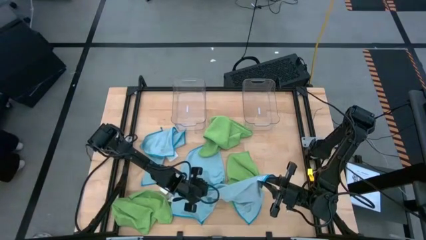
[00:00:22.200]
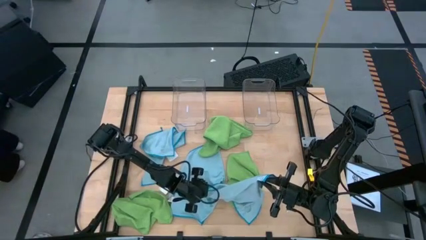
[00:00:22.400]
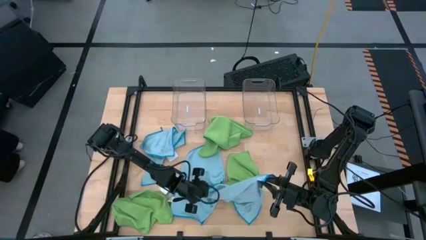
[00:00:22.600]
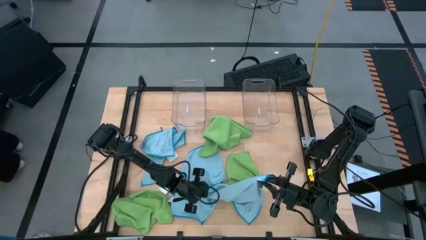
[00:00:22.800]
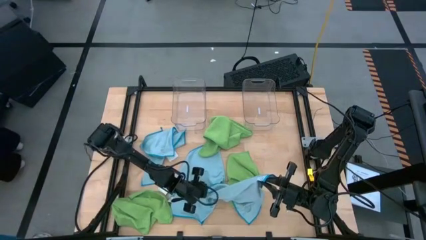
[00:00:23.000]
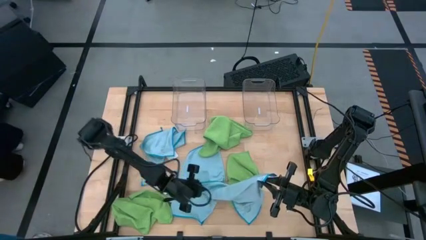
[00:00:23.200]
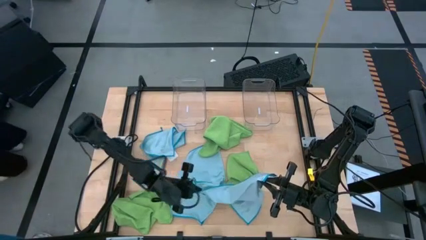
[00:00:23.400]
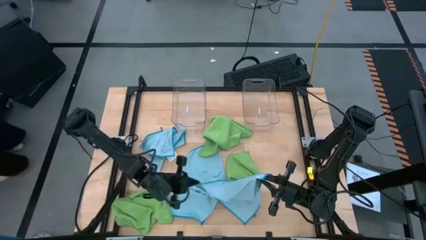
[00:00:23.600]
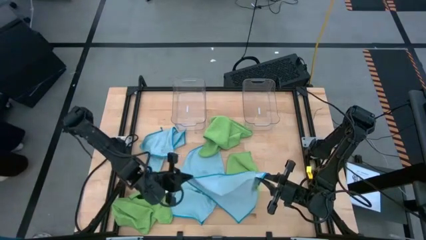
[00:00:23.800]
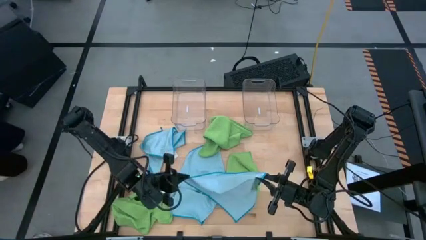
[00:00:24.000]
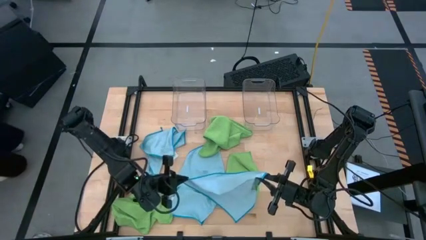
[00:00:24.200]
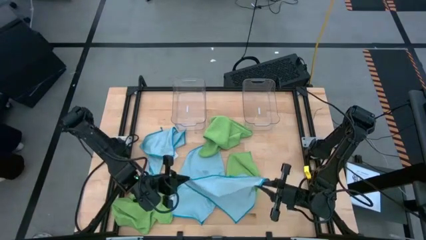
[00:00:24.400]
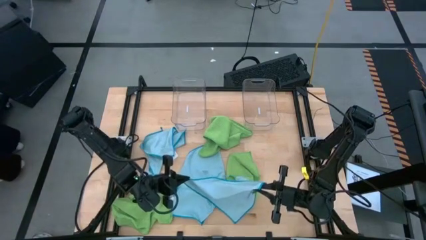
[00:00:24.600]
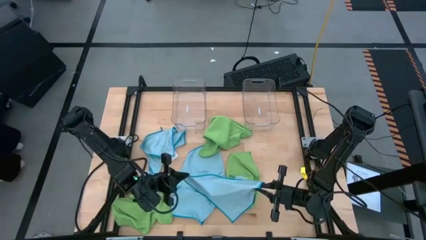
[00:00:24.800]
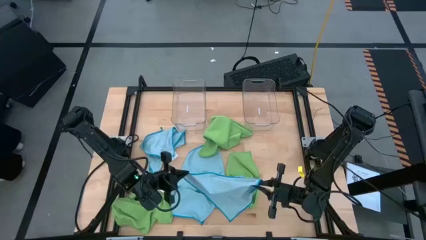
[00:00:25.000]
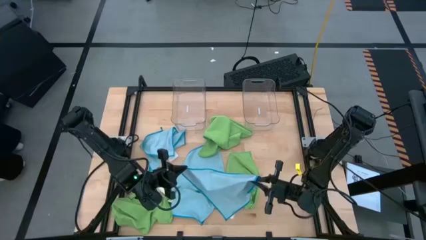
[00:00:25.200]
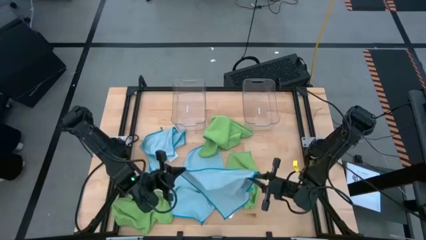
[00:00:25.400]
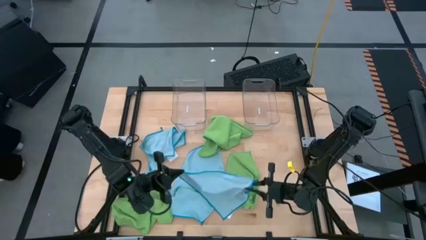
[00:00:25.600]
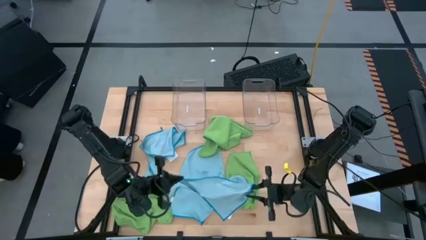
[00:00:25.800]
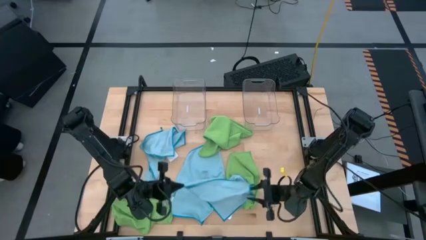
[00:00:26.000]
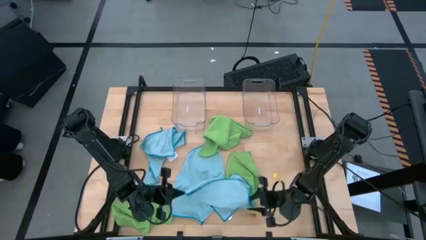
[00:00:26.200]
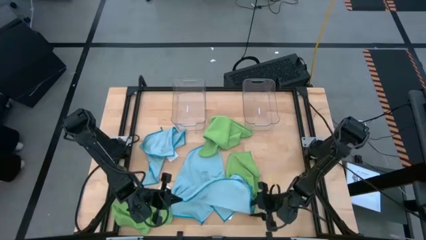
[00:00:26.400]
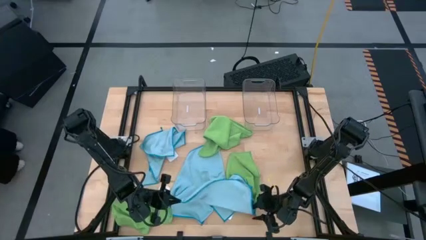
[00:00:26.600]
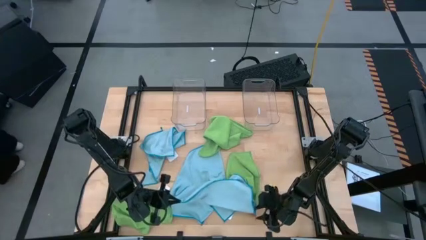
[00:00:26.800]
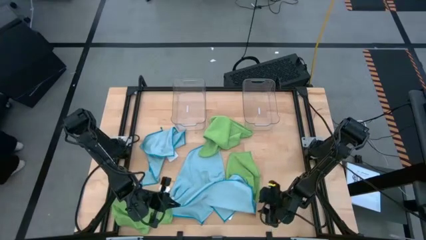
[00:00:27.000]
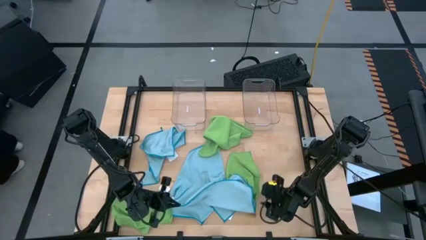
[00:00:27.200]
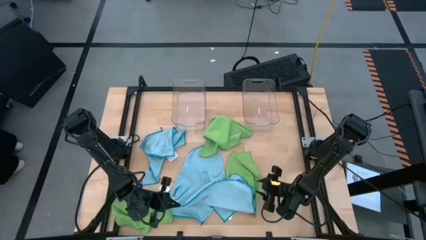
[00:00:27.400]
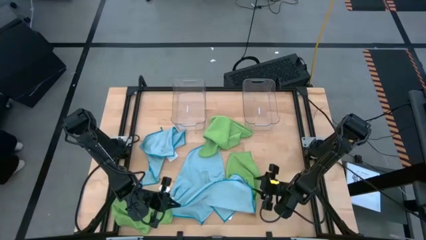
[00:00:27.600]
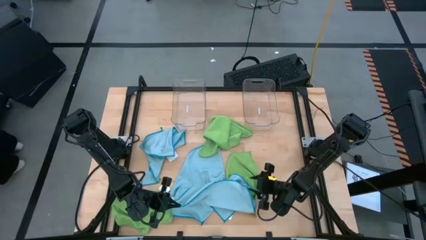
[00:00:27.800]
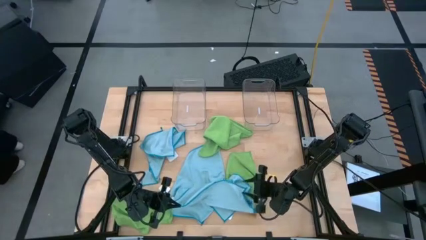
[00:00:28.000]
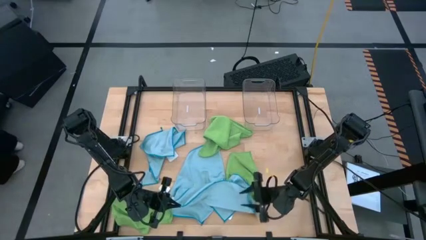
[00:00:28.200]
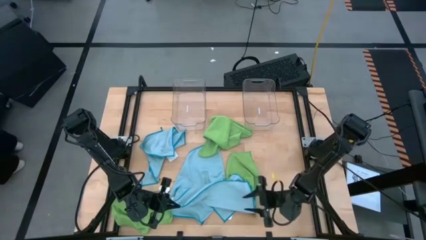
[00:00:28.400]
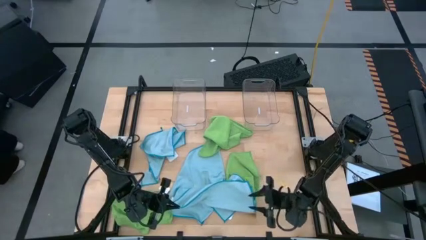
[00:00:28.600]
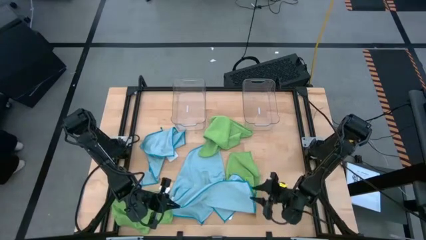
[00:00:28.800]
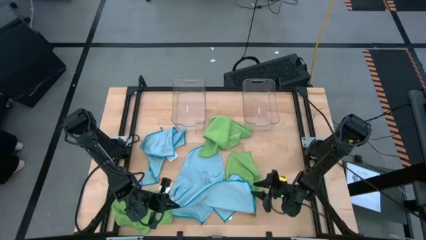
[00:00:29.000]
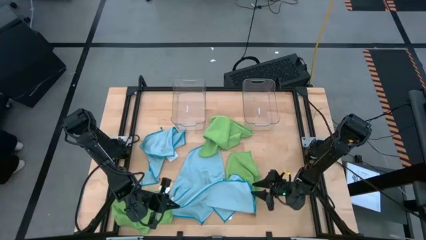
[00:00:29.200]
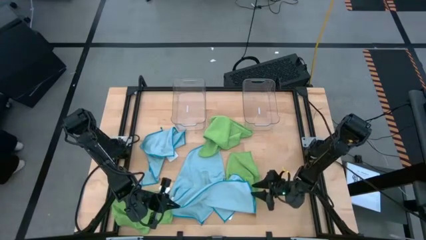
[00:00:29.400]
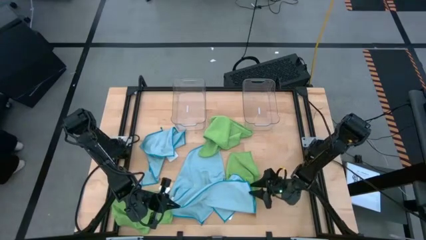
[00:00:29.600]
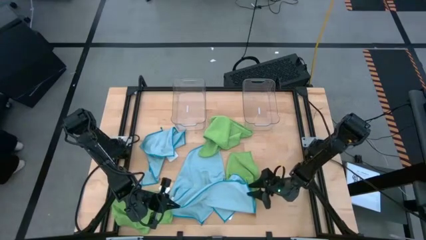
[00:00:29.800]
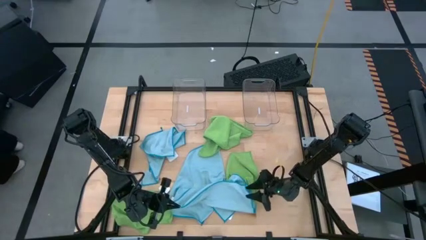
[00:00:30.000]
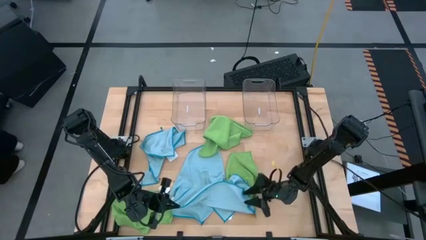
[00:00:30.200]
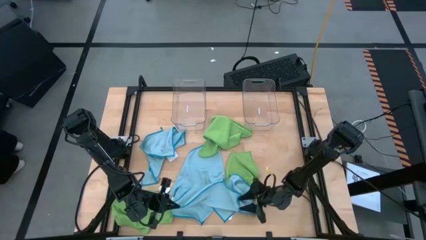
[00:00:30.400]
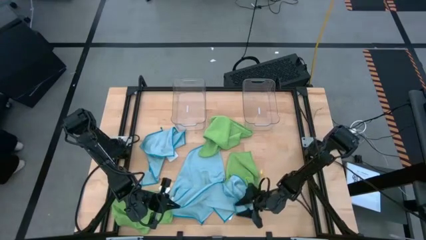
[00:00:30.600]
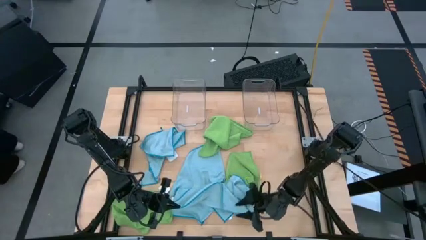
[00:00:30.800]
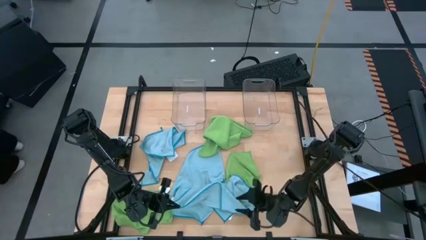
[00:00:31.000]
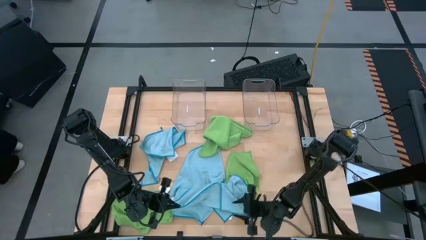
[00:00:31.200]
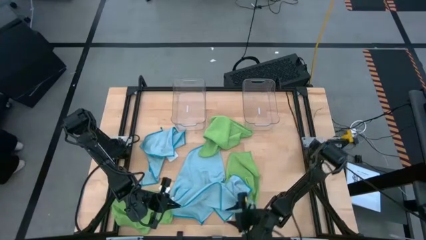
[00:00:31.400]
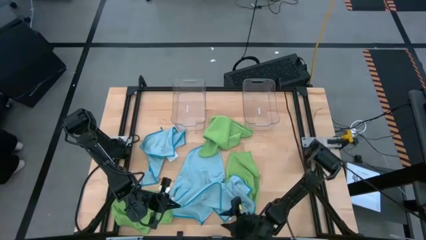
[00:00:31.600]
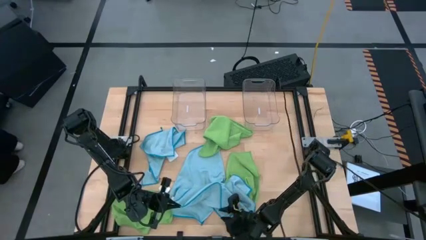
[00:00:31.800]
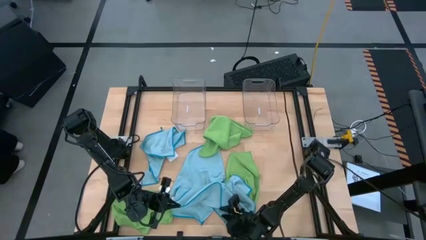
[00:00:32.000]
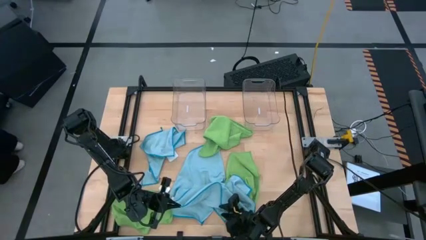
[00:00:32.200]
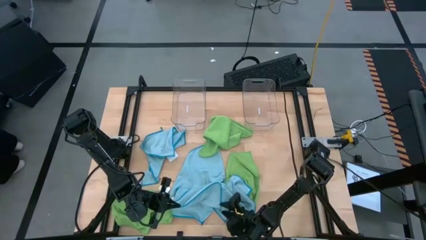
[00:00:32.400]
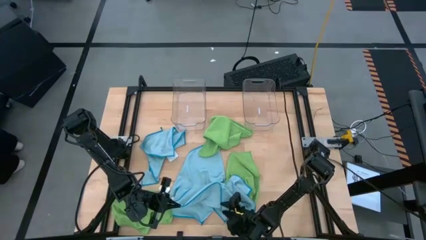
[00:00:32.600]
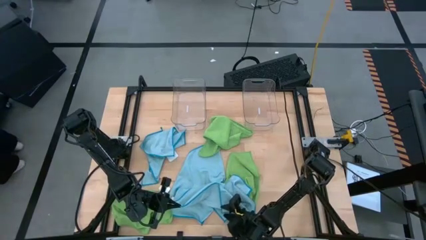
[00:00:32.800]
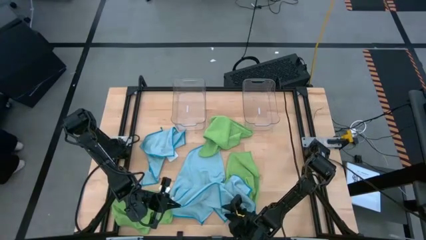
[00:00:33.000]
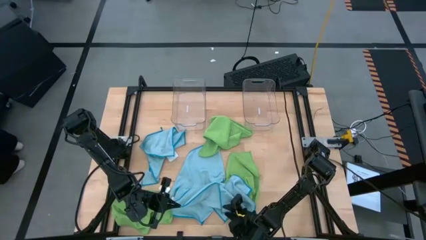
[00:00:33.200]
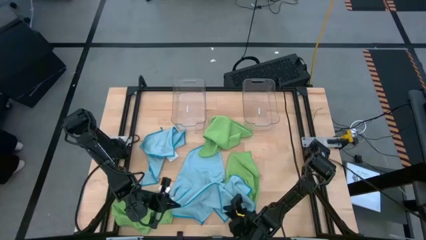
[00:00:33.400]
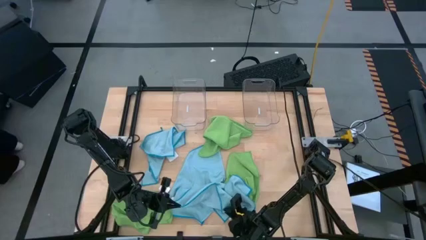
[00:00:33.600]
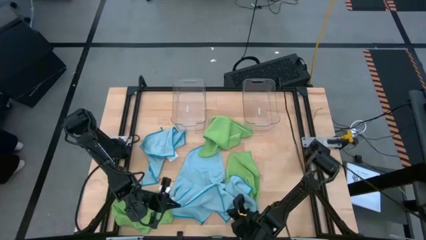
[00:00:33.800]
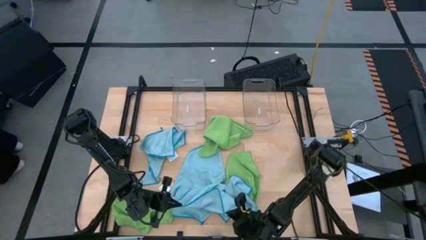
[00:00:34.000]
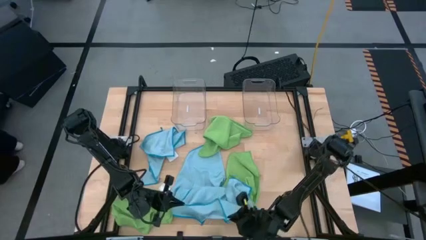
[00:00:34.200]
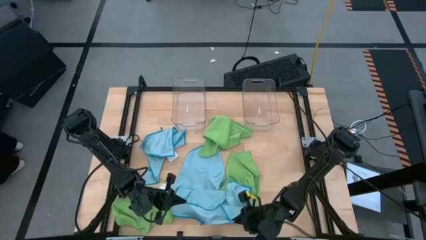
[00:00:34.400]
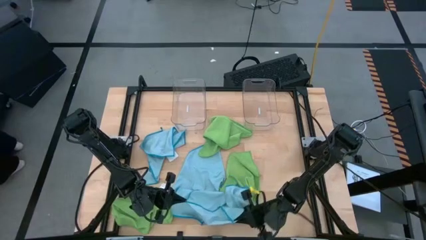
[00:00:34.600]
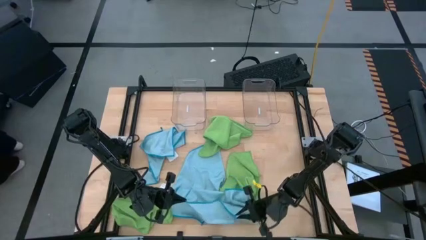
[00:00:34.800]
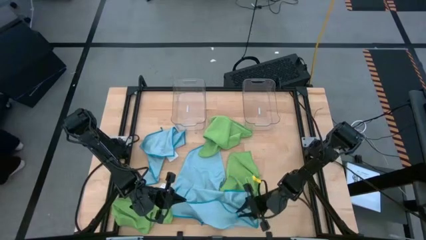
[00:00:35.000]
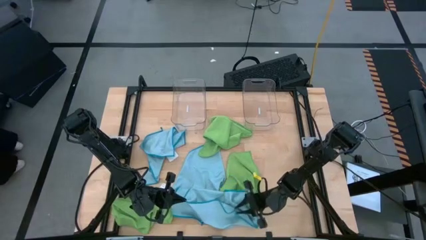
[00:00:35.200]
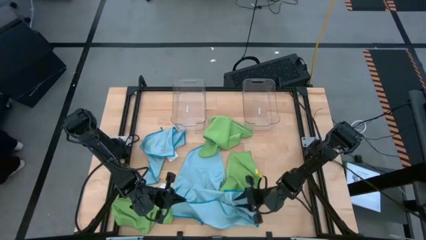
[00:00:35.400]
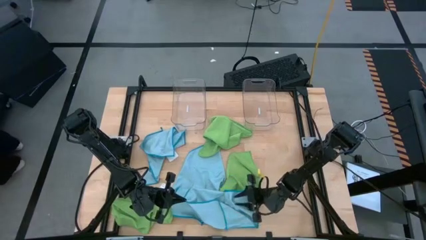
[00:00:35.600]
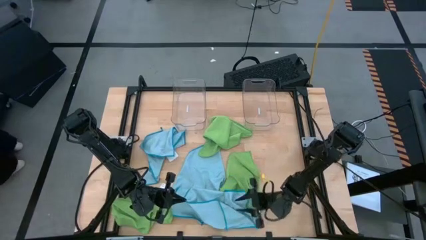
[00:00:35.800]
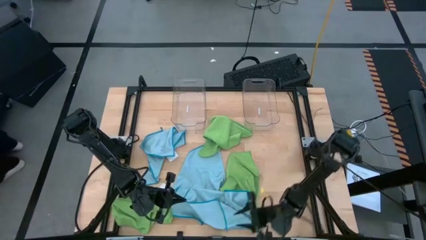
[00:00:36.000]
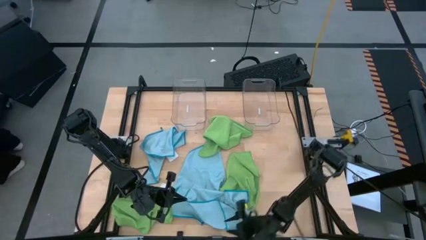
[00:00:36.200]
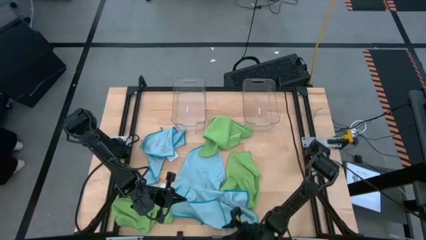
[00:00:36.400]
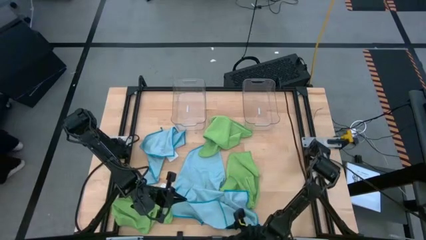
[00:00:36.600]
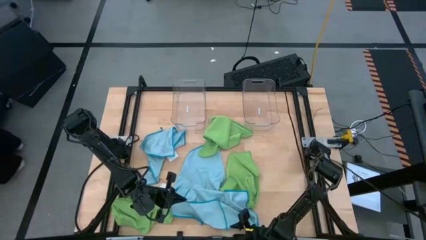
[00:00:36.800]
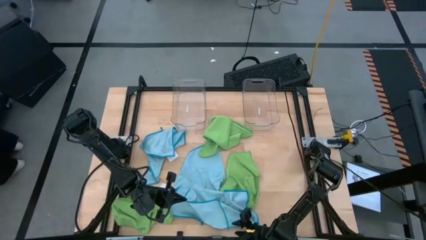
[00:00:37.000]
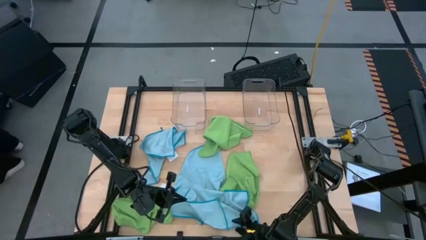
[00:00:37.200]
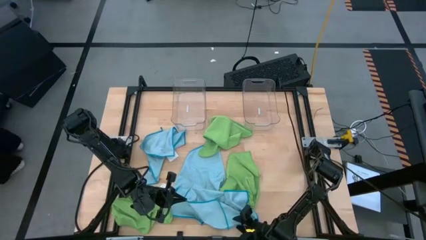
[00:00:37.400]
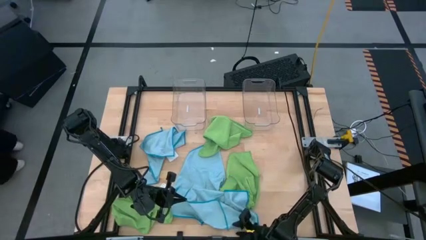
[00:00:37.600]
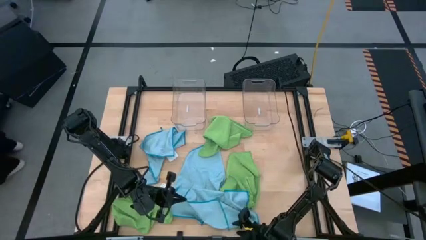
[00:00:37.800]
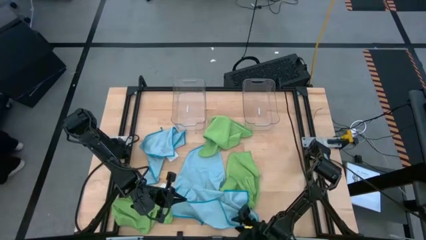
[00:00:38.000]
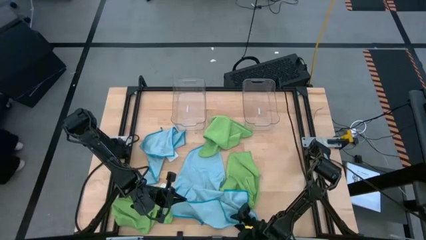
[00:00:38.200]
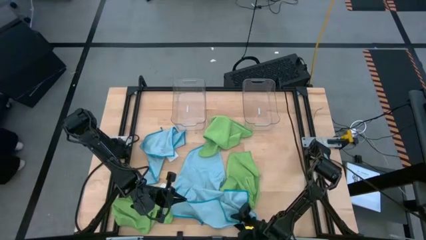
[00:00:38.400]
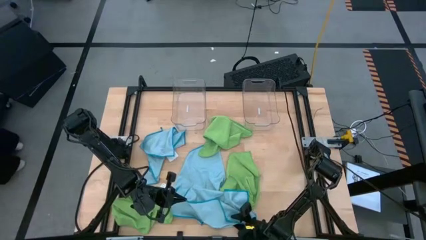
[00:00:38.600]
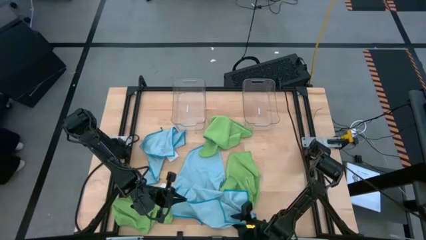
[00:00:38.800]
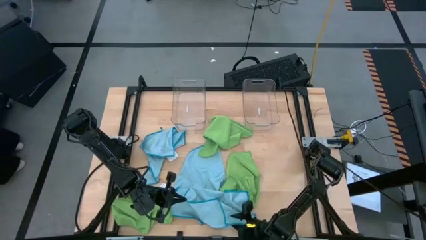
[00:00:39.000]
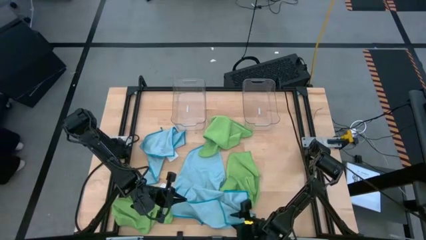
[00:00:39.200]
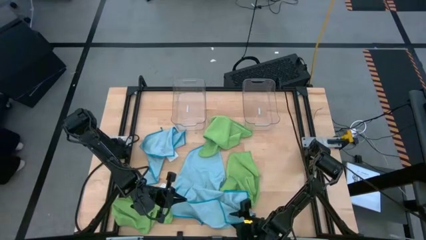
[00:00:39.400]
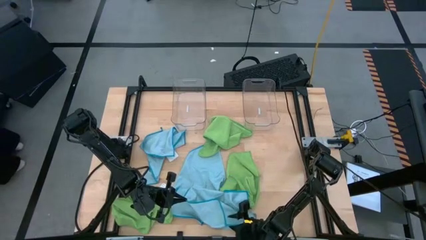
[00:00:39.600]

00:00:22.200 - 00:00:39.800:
Task: Fold microfiber towels
Fold the right blue microfiber towel
